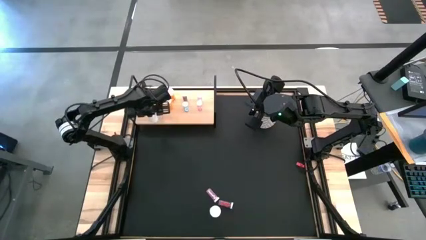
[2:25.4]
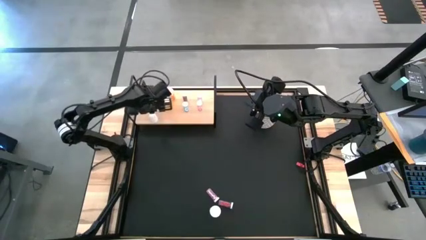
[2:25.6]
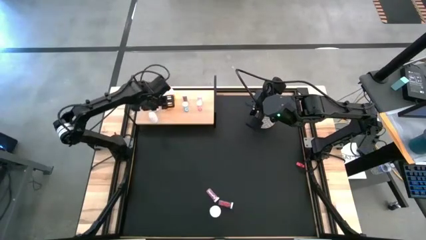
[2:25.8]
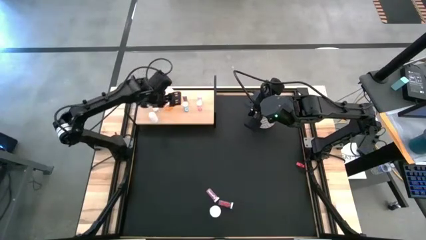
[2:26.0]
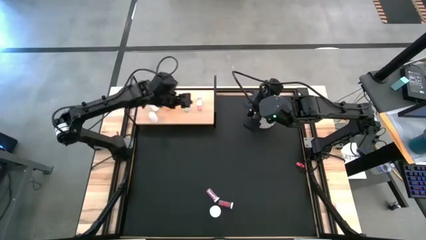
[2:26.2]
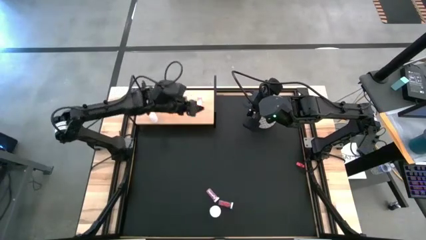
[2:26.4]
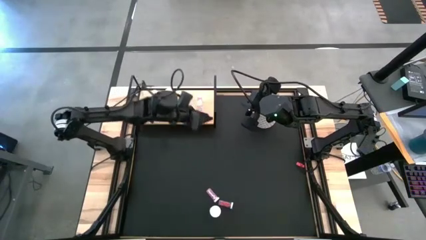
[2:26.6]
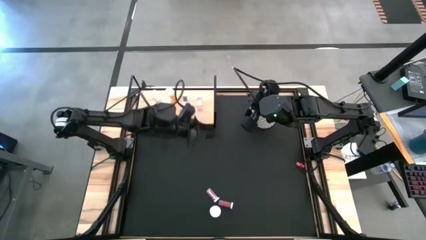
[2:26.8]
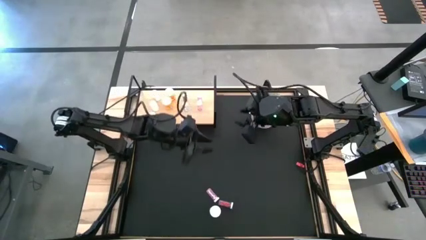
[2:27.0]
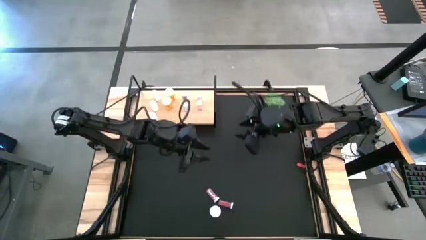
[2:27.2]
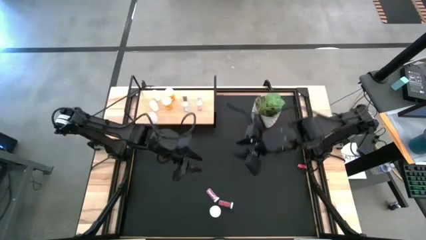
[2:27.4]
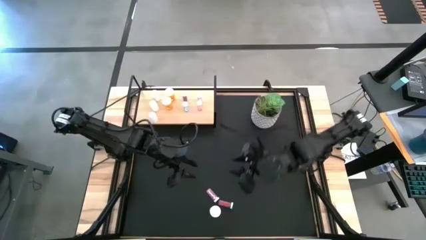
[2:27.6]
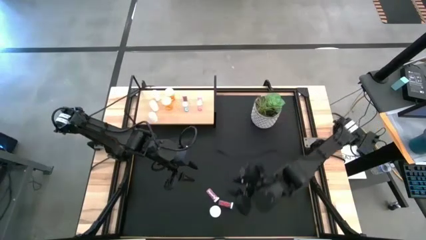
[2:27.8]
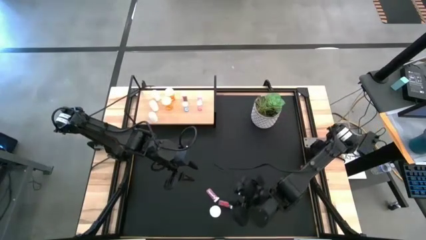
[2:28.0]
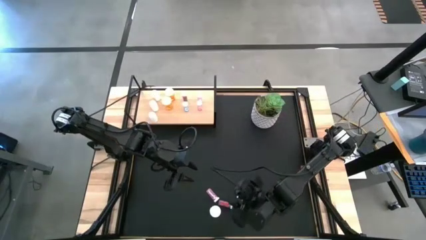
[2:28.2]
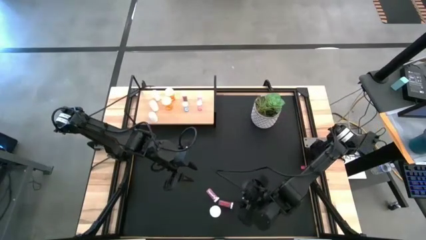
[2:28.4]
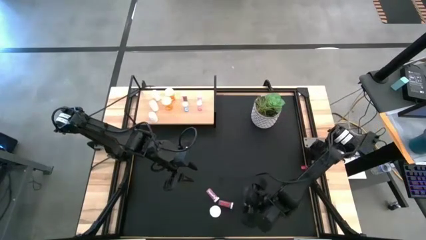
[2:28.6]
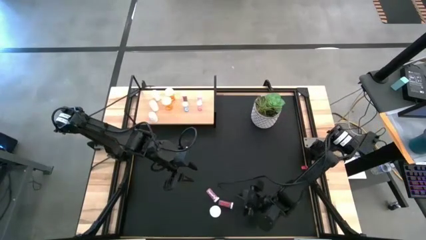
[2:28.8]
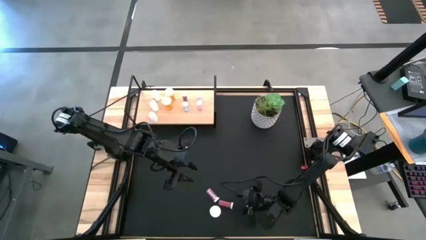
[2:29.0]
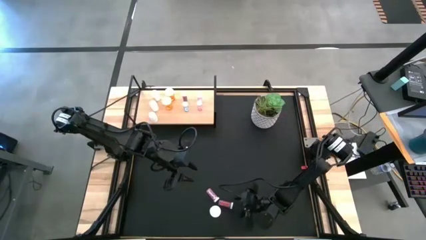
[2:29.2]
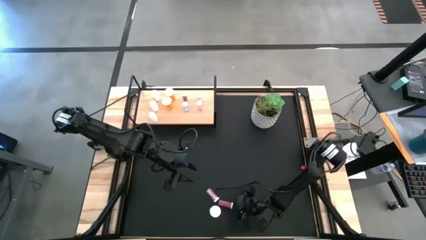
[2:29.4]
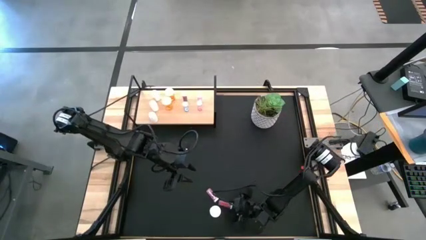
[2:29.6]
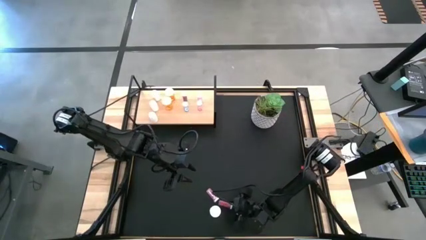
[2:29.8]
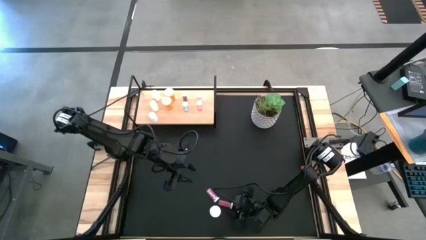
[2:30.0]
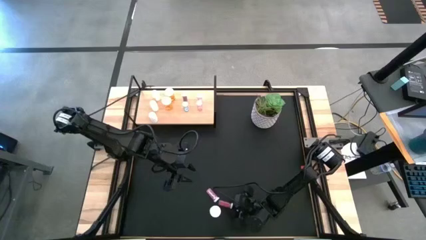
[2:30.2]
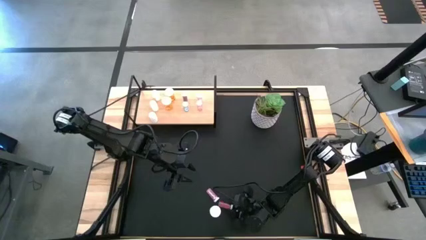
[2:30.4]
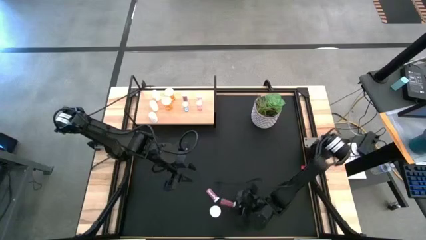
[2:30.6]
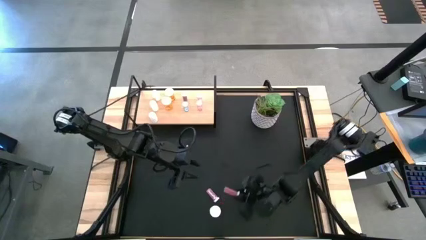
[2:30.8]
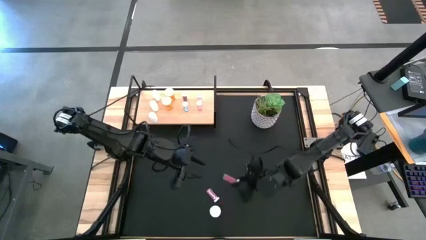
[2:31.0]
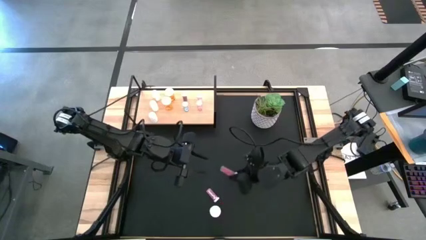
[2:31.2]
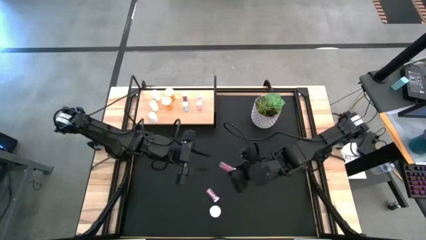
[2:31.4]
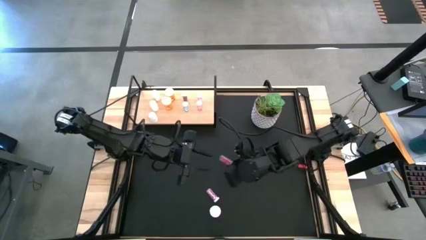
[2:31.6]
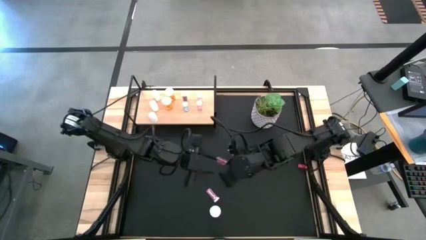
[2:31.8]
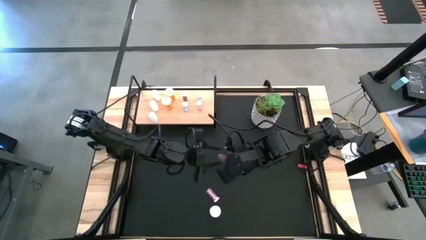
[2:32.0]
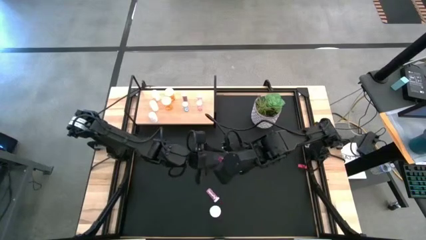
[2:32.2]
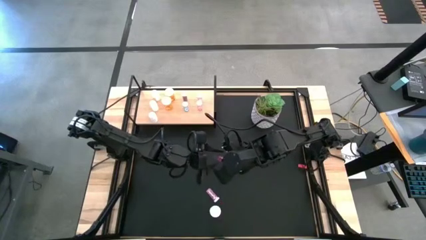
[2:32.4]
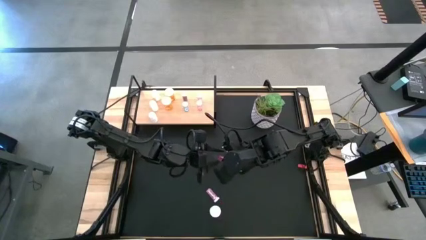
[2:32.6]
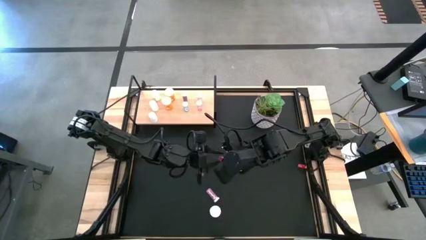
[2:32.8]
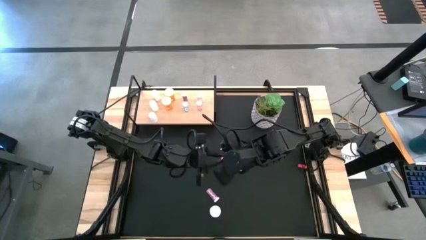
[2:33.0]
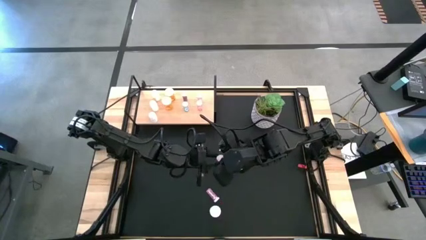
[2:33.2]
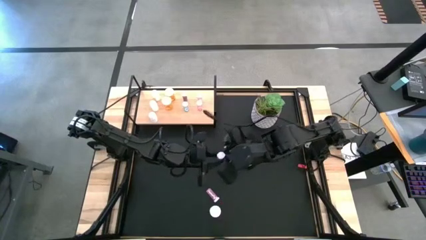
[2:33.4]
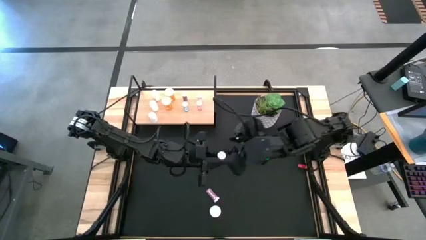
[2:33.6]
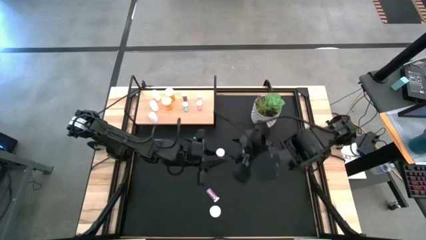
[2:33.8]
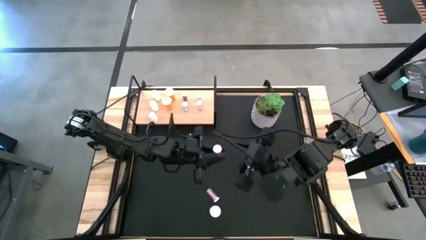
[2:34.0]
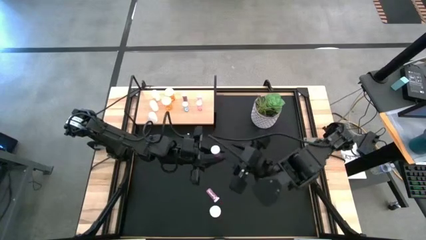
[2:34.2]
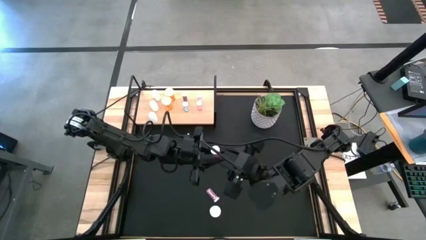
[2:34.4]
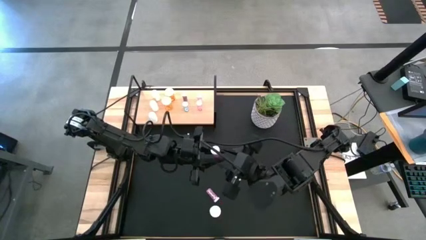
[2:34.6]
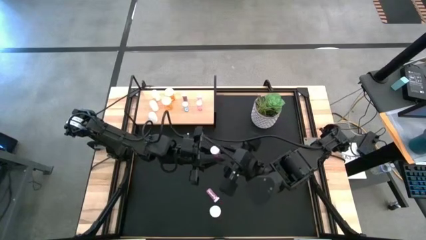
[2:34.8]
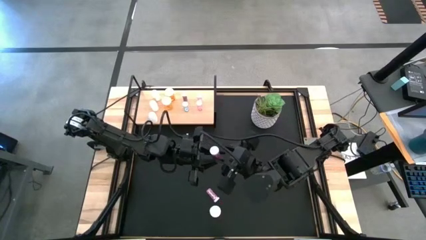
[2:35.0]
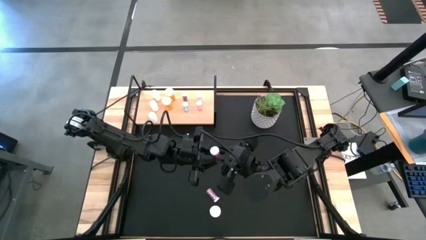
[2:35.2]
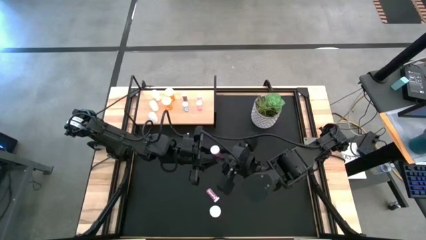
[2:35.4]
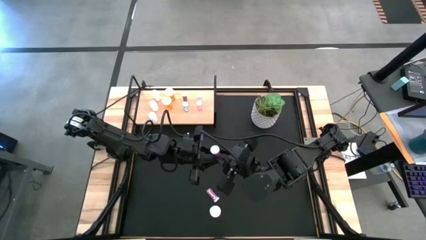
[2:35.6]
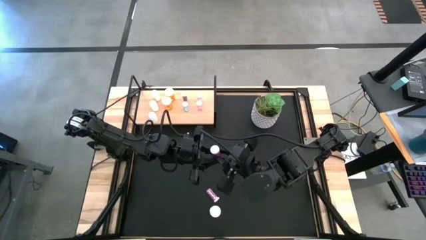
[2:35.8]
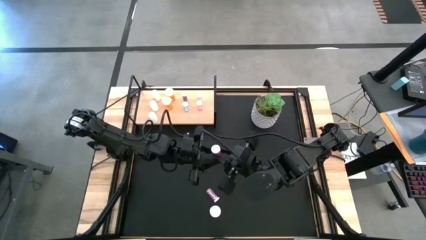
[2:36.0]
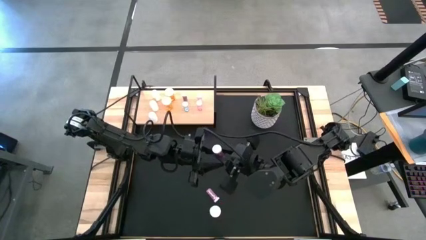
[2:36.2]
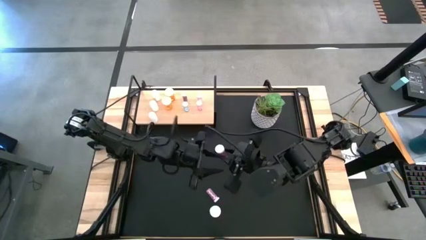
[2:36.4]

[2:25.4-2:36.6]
Task: Pick and place medicine bottles onto shelf by color
Put the blue pill bottle on the shelf aligned with the other blue pill bottles

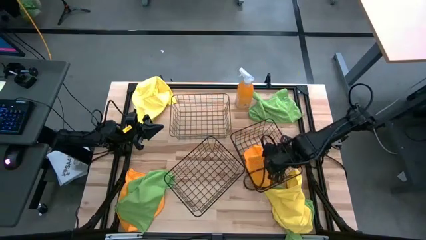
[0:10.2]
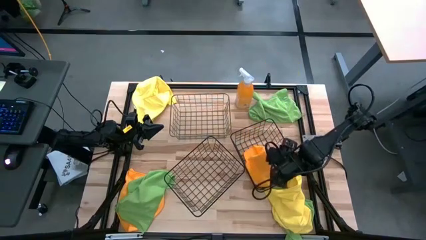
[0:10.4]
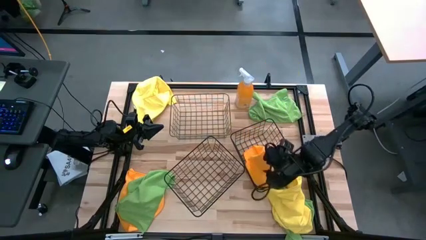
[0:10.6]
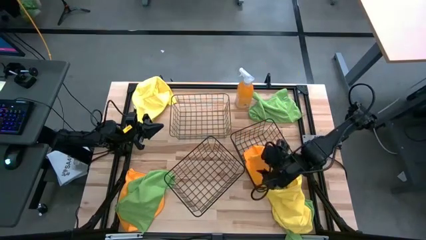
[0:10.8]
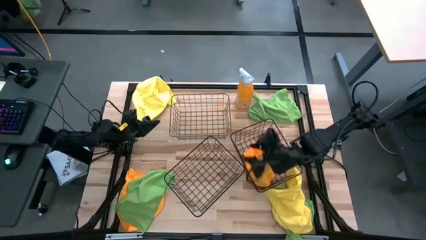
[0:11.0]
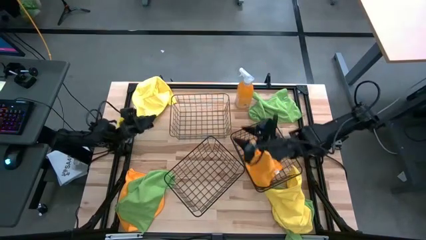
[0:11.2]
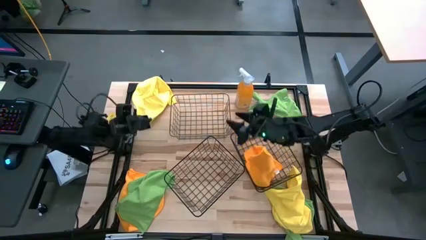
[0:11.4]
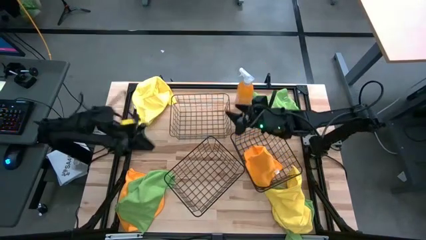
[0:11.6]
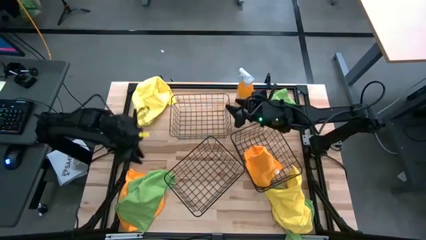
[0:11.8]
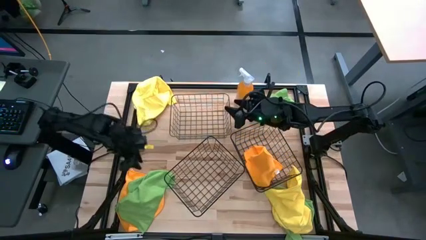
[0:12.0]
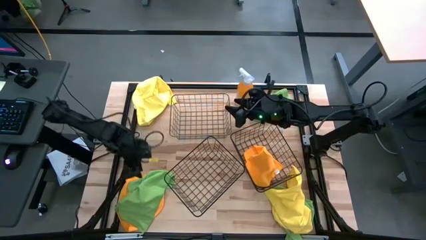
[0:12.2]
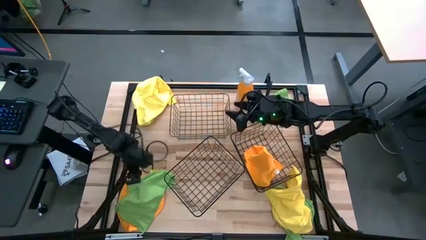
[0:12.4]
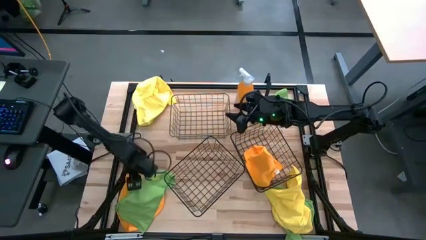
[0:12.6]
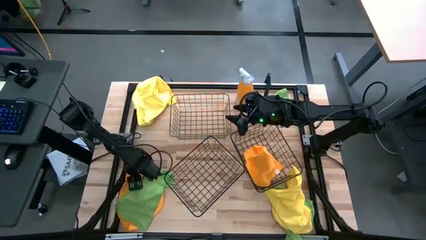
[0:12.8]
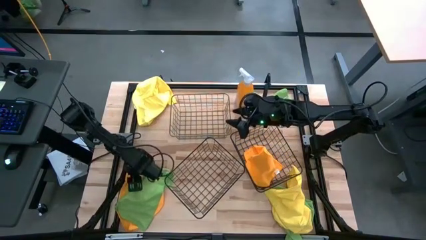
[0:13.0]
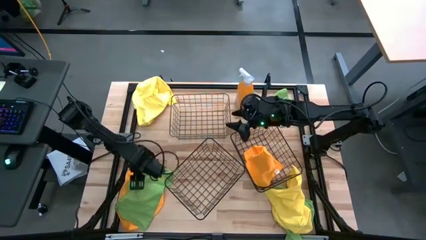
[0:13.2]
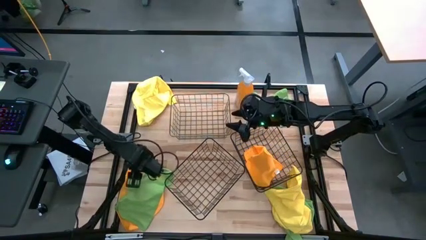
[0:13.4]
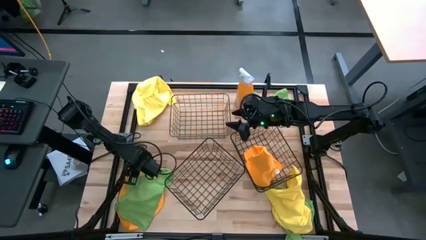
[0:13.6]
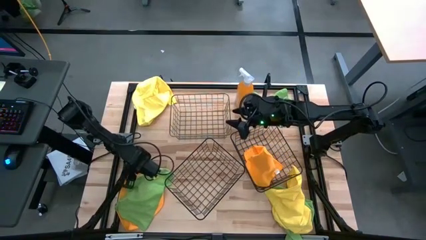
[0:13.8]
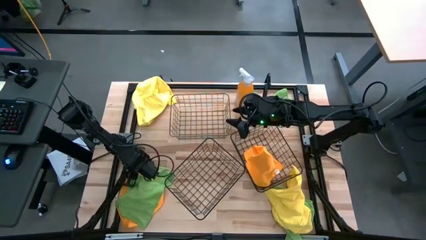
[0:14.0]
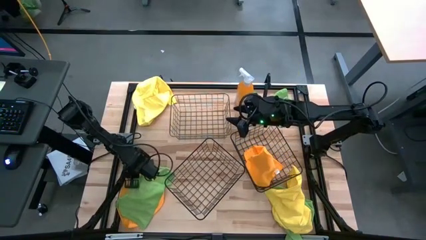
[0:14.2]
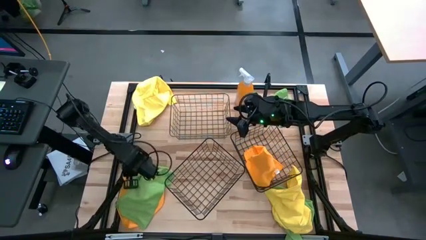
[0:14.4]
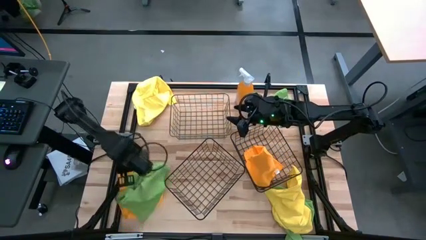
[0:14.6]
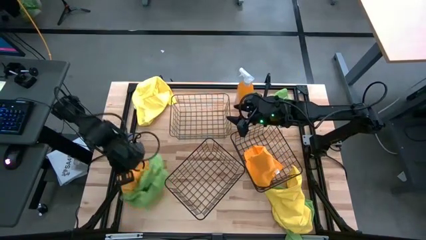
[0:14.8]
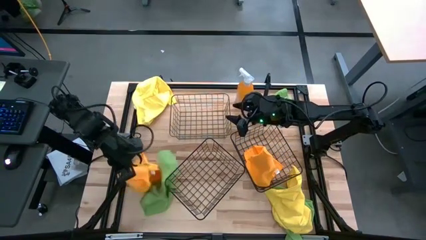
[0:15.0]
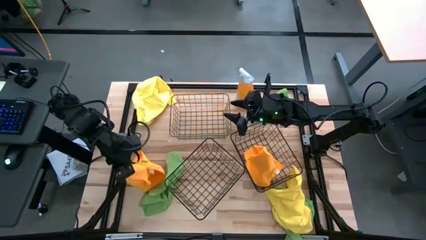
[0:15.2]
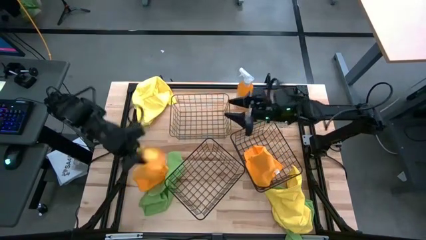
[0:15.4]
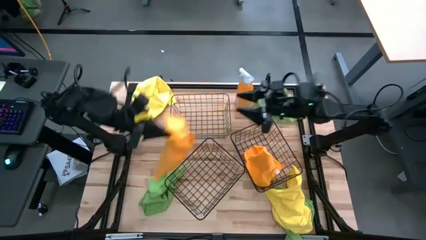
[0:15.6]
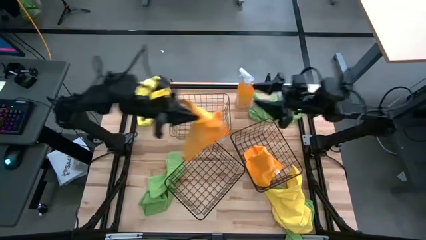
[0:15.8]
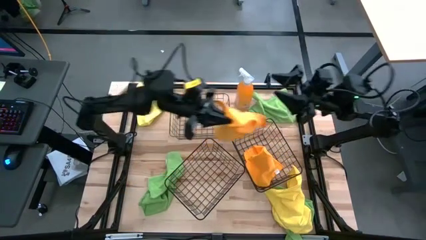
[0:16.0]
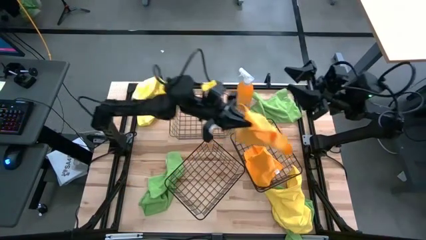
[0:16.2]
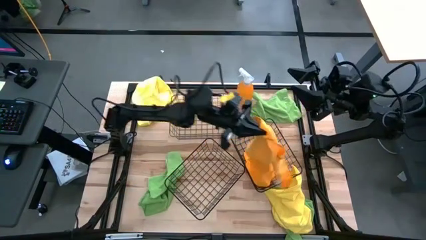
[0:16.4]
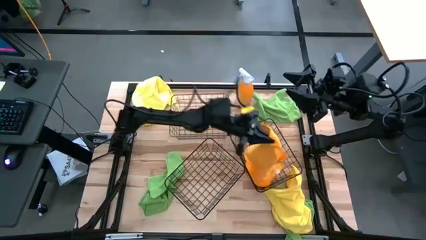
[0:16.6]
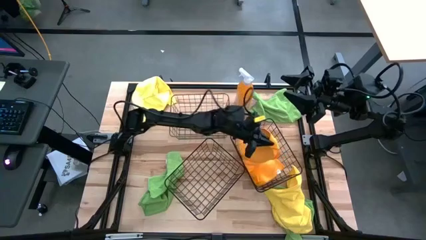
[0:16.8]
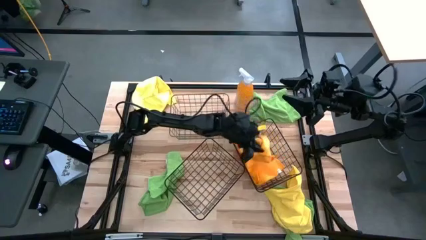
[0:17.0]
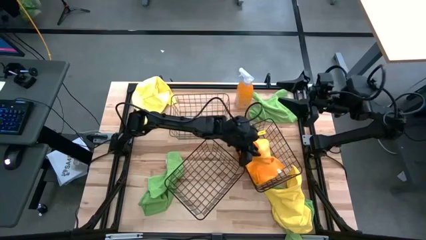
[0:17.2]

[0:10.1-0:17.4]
Task: Sort microfiber towel by color & place in baskets
Put the orange microfiber cloth into the right wire basket
